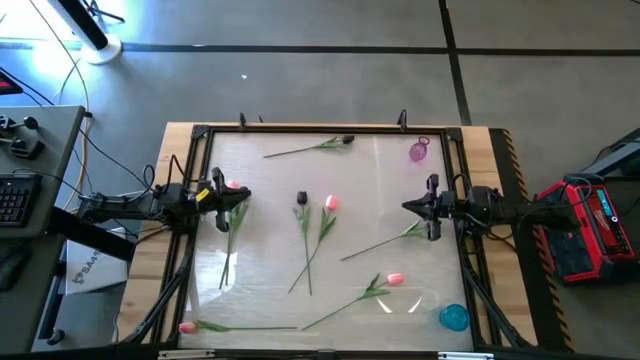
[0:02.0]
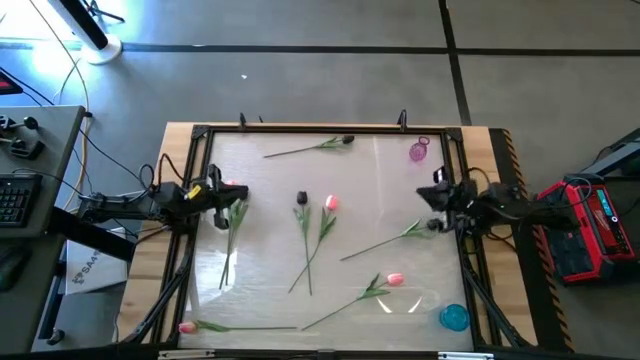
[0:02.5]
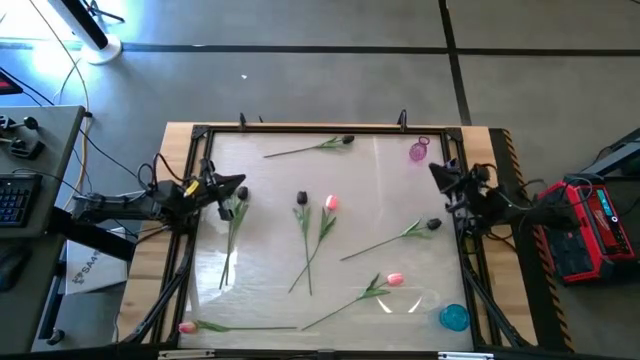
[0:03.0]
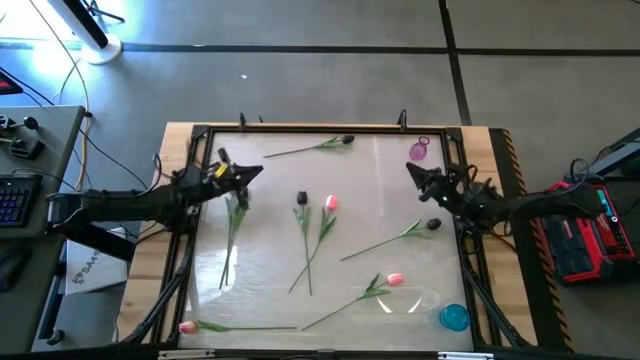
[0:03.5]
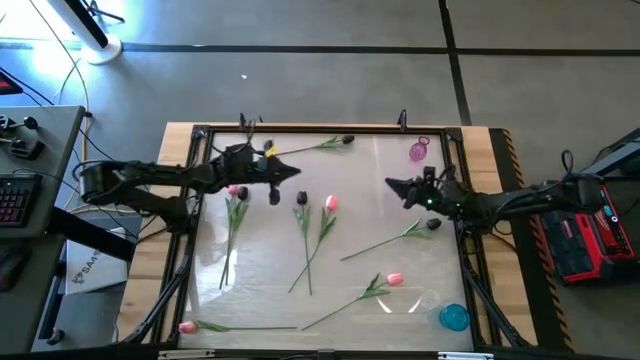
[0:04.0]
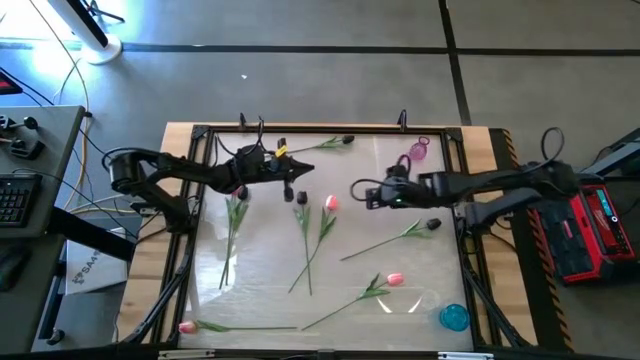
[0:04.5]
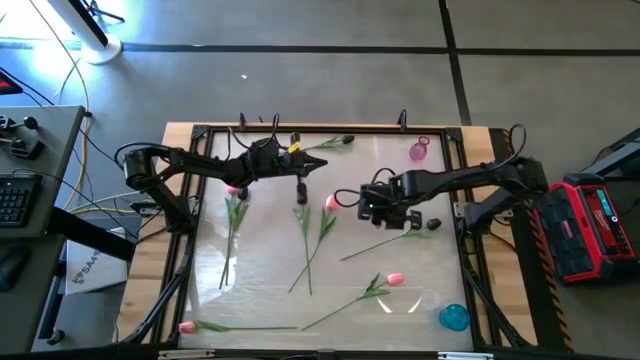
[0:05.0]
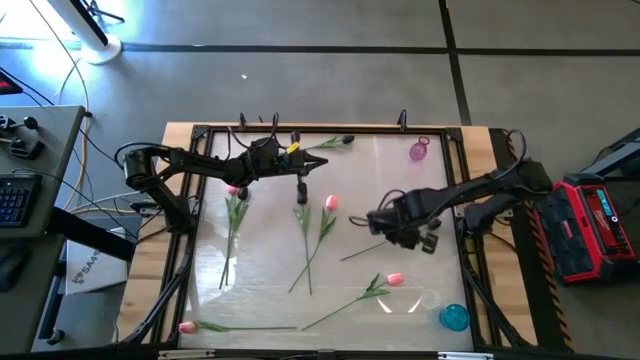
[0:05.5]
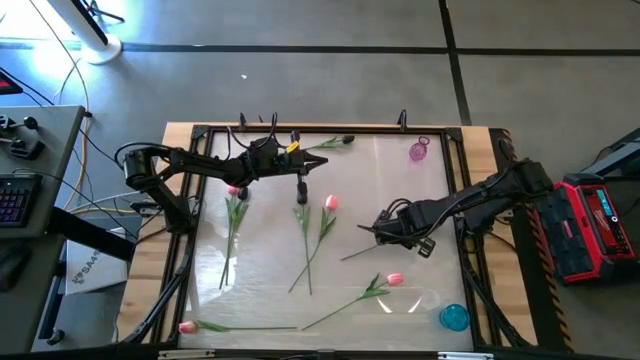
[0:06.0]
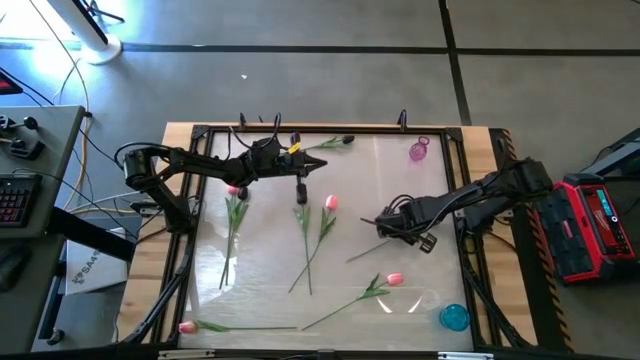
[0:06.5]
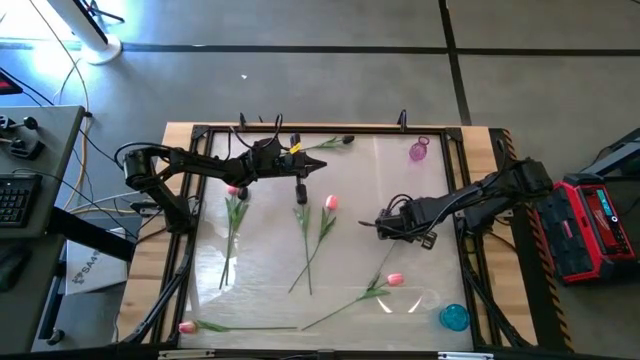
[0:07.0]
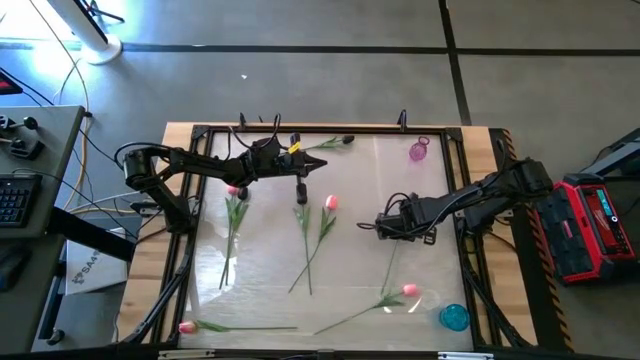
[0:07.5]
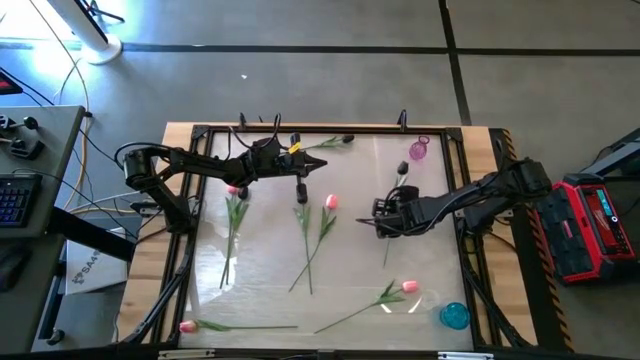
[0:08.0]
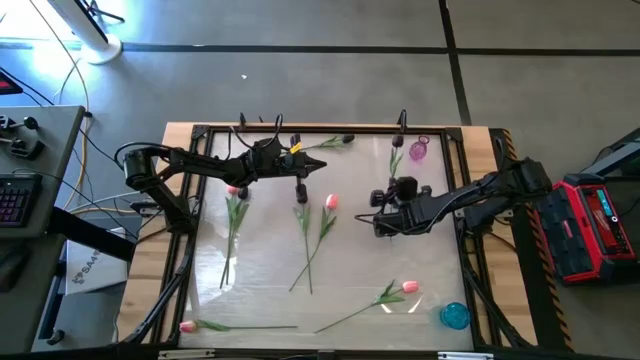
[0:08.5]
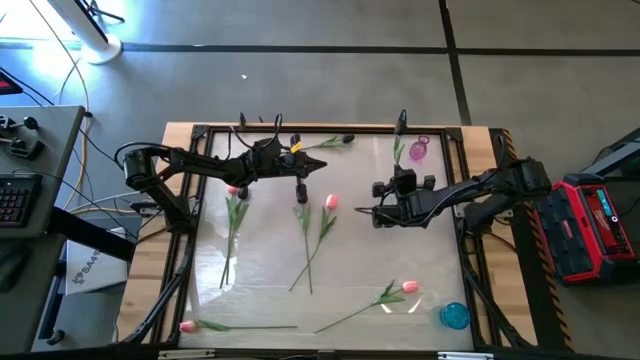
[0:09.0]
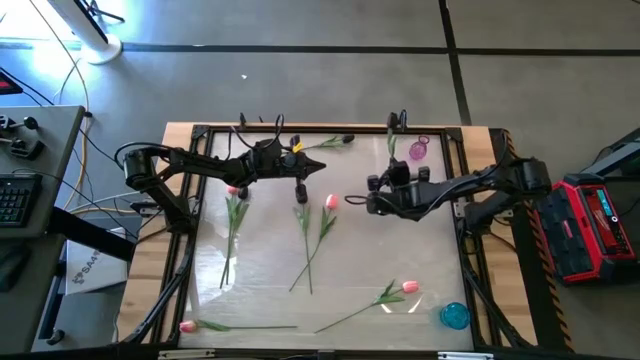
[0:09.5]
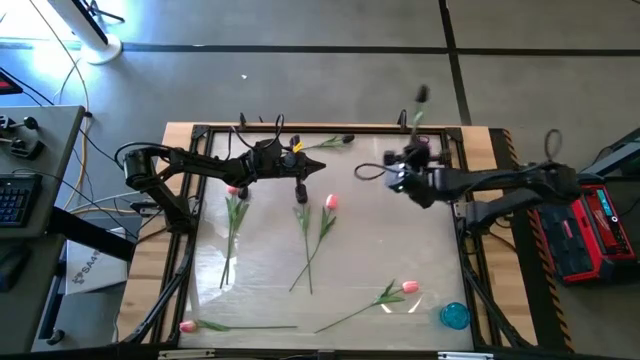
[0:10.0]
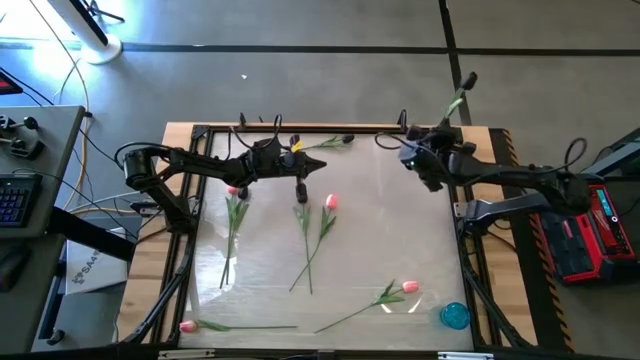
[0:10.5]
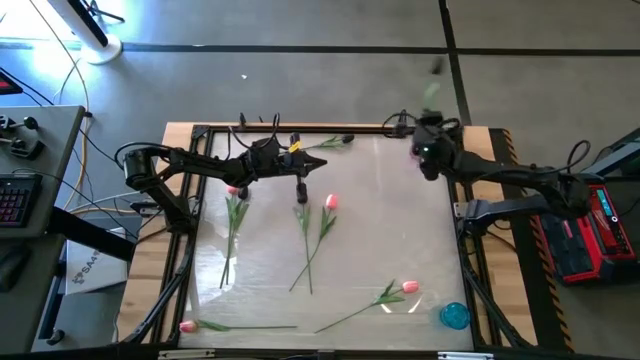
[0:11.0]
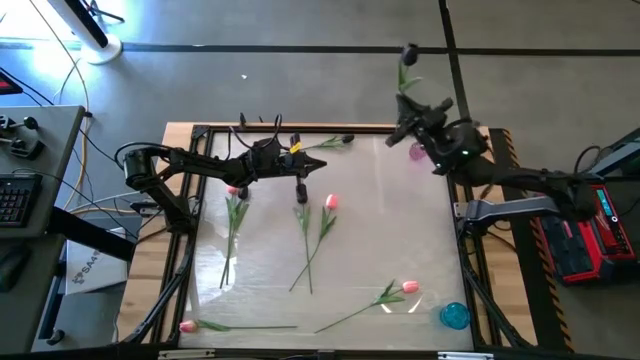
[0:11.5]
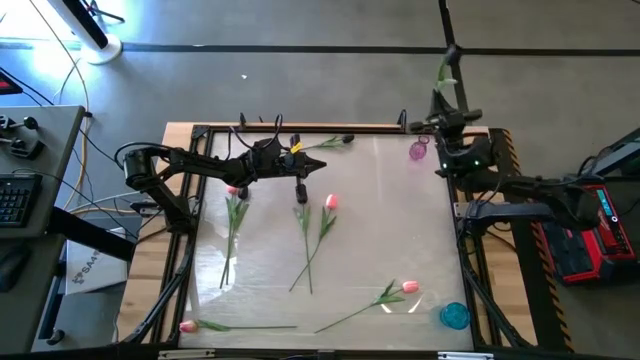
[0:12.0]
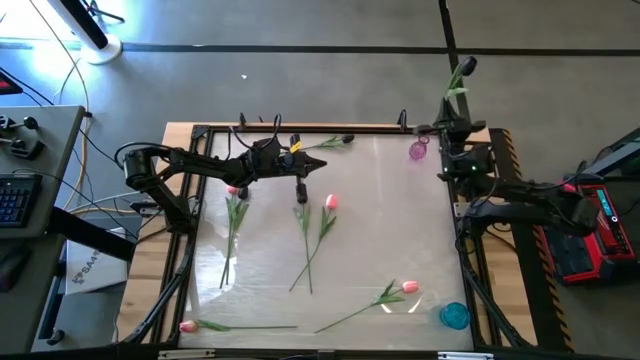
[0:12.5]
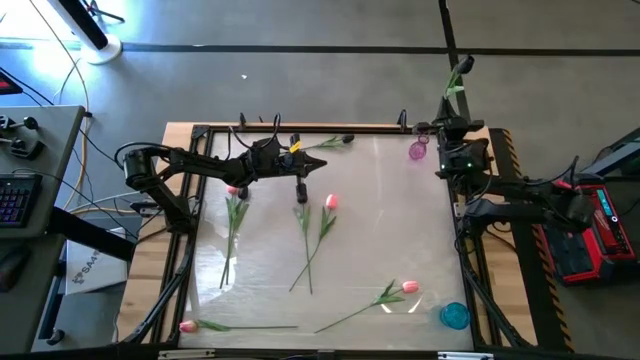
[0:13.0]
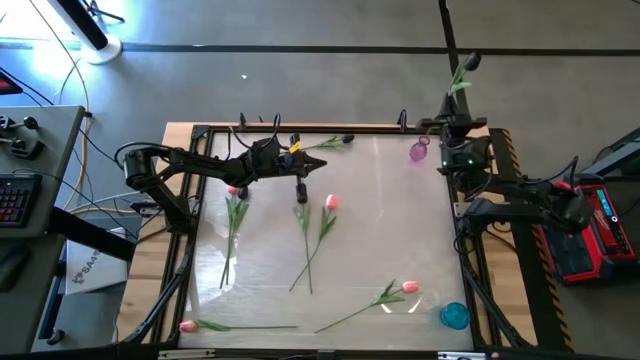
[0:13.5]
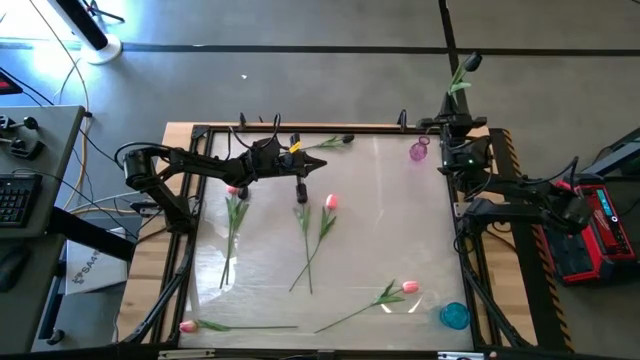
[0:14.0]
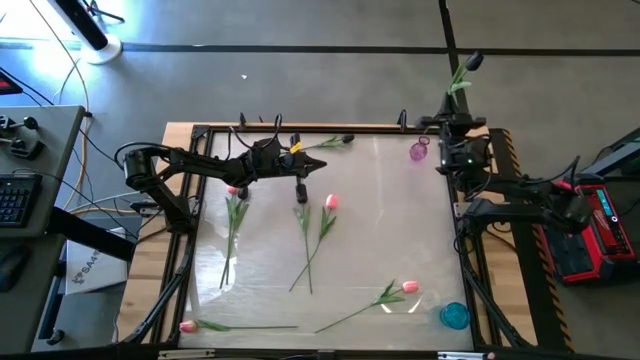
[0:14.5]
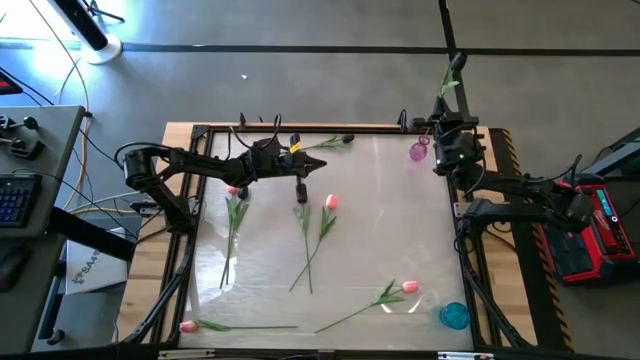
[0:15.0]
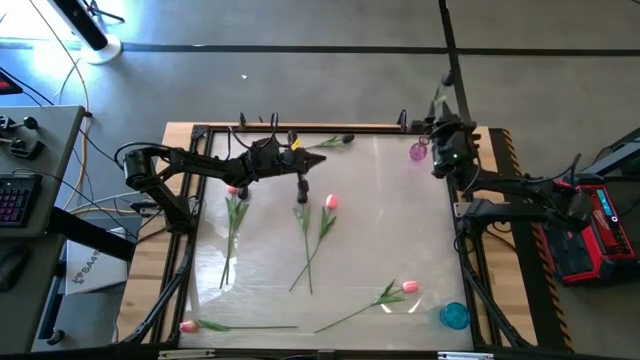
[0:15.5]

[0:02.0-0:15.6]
Task: Sort flowers into vase by color
Put the middle right black flower into the purple vase

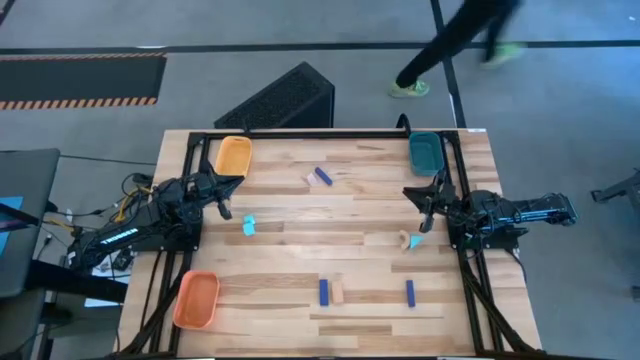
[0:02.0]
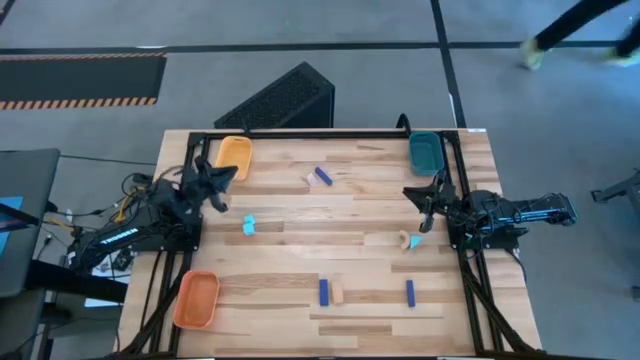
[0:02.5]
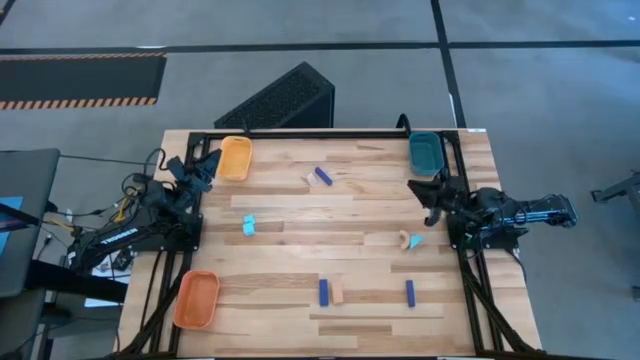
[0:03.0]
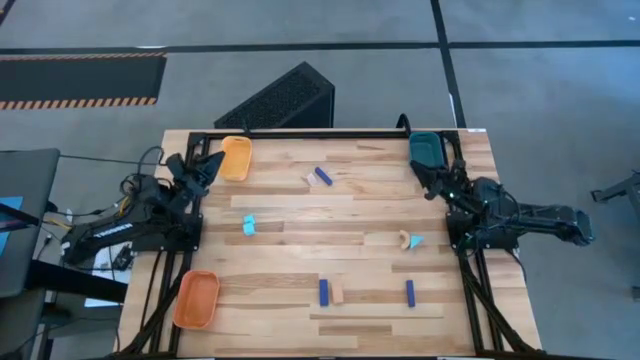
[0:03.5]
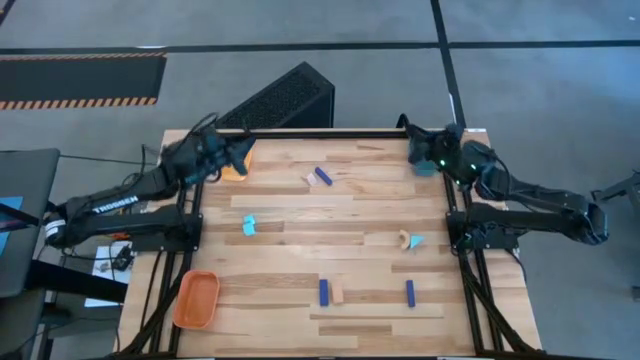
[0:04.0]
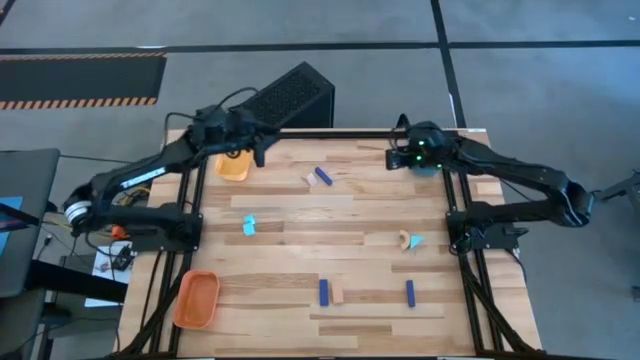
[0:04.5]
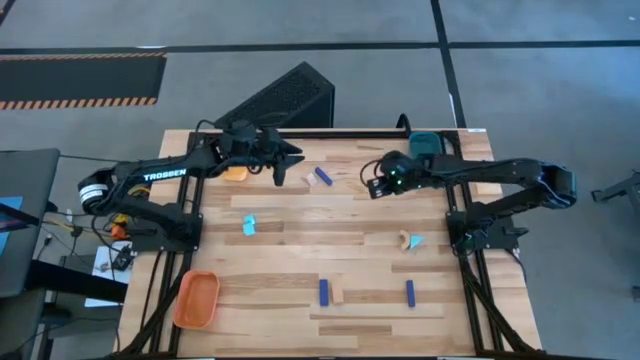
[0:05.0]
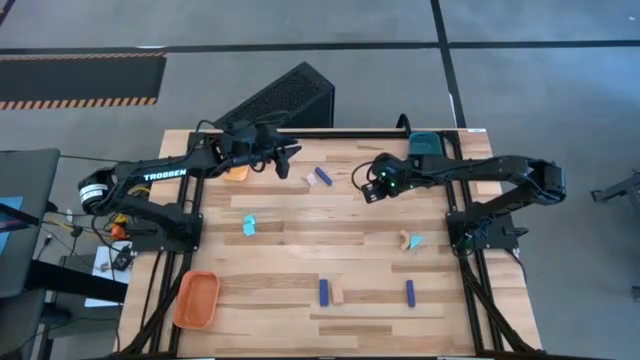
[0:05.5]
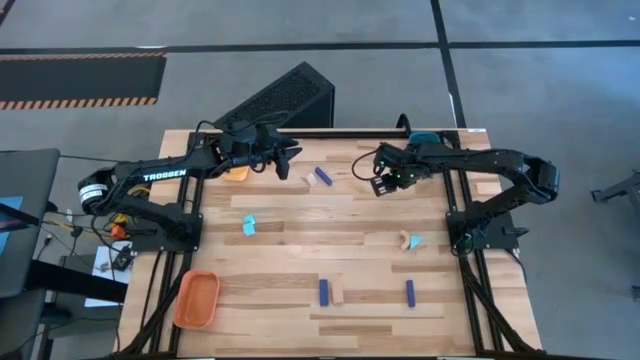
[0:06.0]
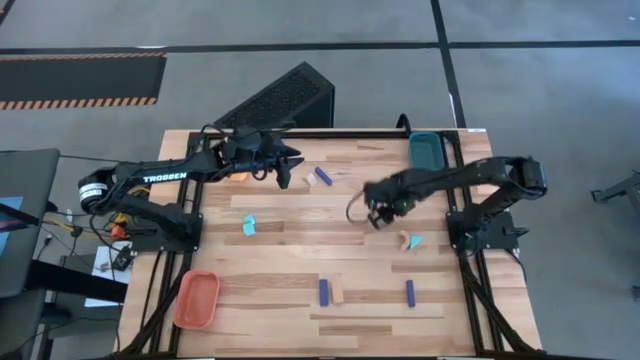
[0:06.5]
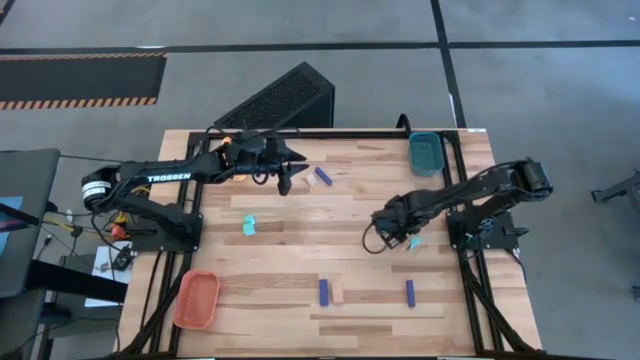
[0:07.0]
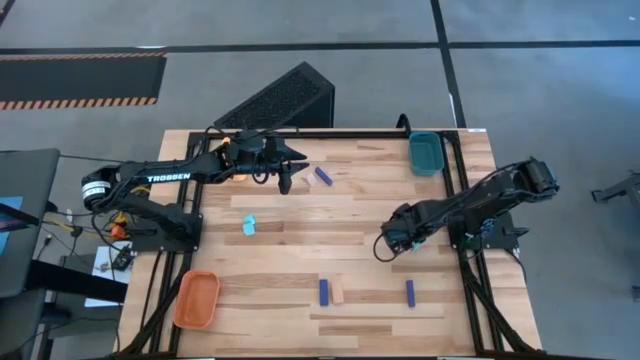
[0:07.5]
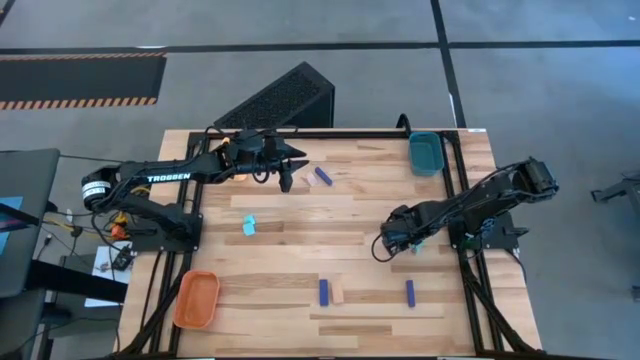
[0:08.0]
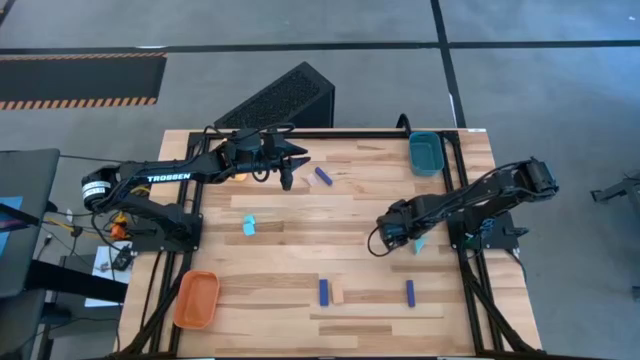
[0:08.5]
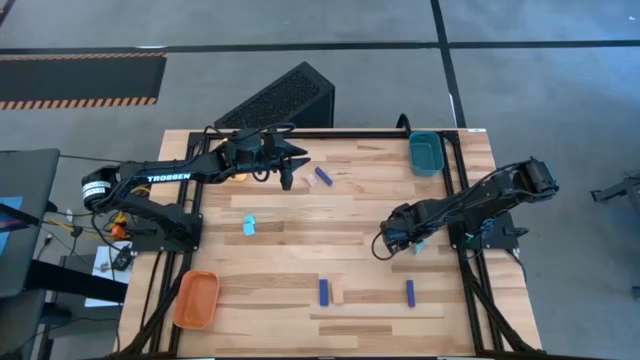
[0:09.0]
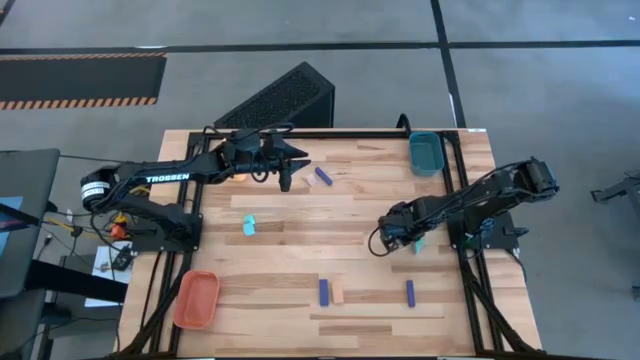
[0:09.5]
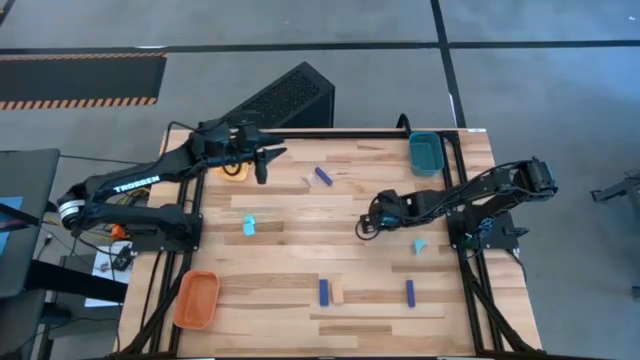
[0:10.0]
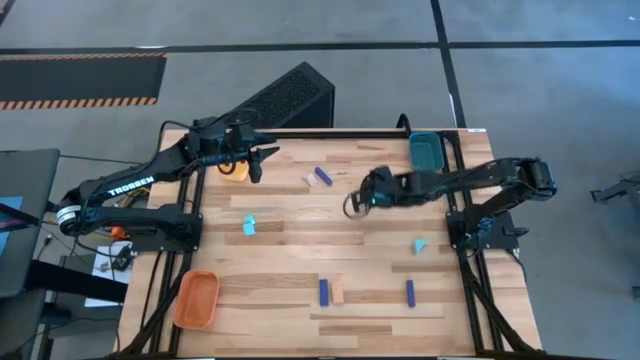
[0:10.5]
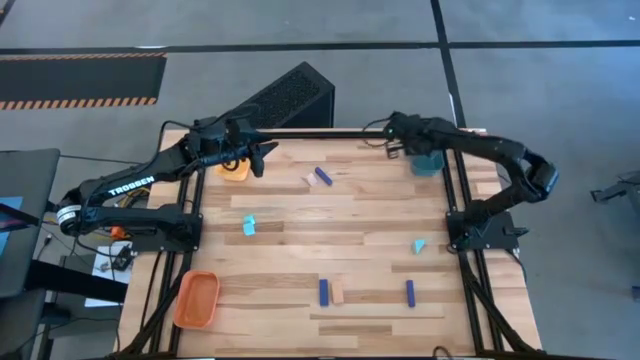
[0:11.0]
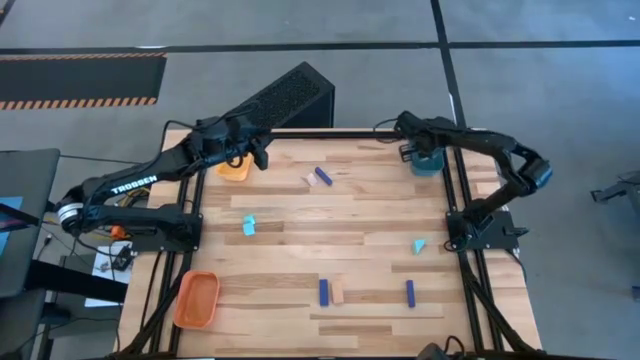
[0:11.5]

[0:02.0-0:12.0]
Task: Sort & place blocks by color
Put the middle brown block into the blue bin
